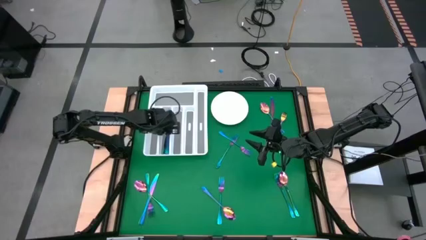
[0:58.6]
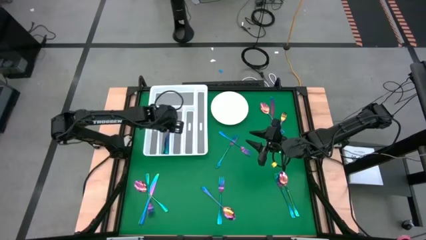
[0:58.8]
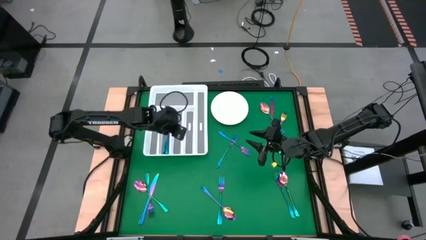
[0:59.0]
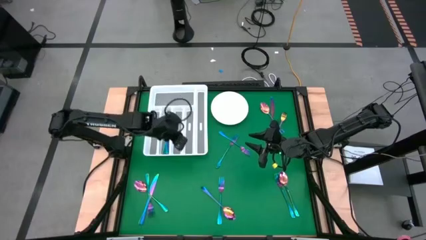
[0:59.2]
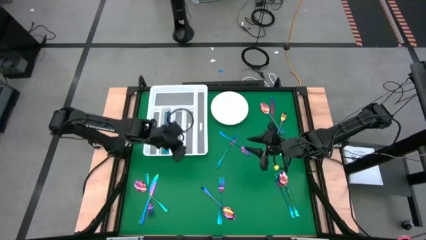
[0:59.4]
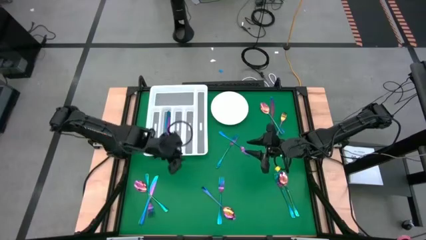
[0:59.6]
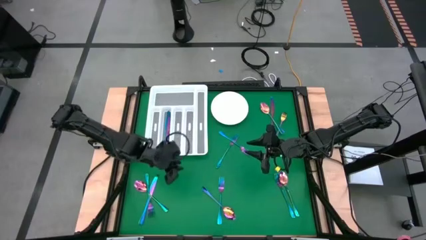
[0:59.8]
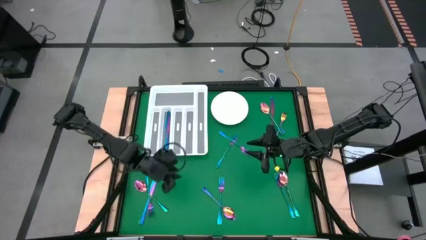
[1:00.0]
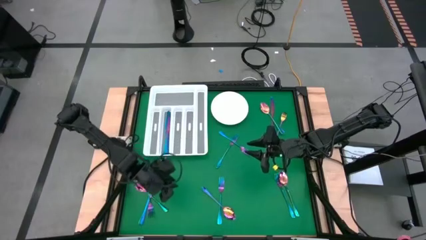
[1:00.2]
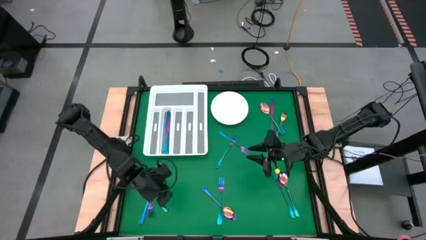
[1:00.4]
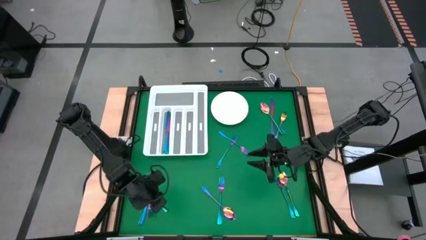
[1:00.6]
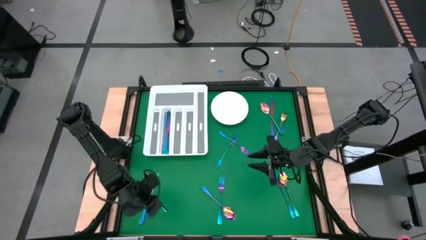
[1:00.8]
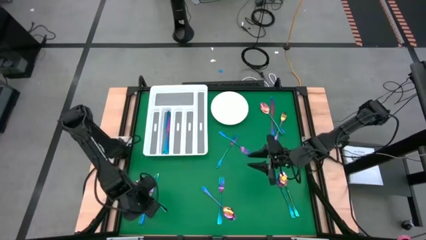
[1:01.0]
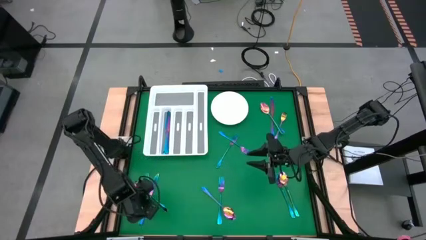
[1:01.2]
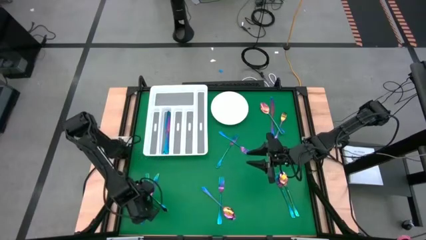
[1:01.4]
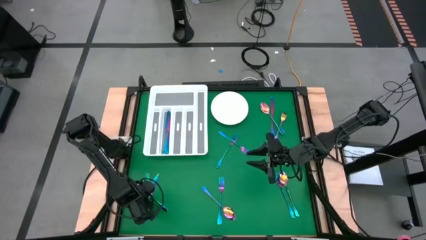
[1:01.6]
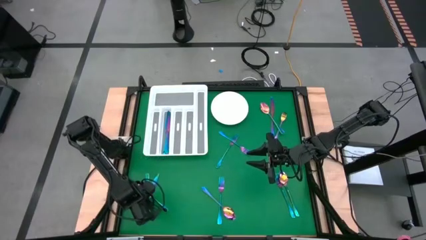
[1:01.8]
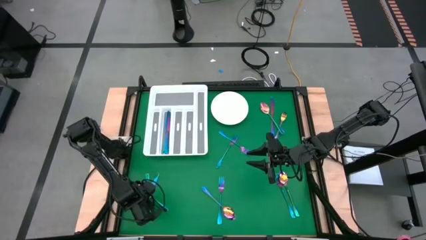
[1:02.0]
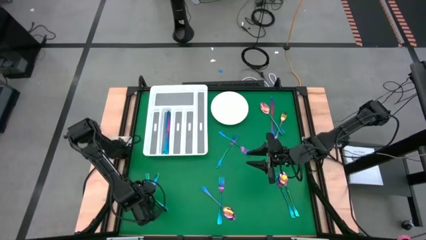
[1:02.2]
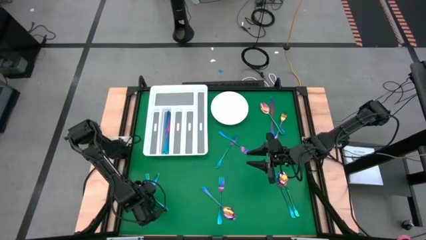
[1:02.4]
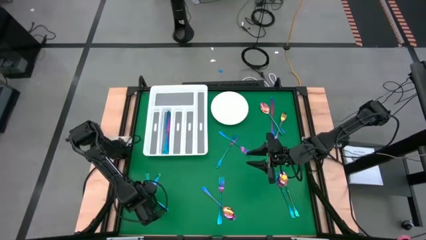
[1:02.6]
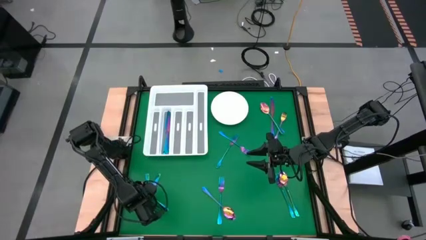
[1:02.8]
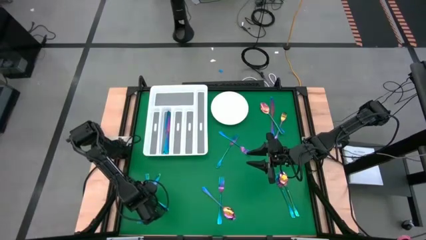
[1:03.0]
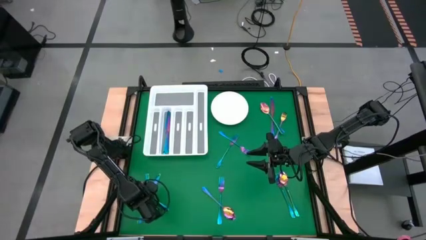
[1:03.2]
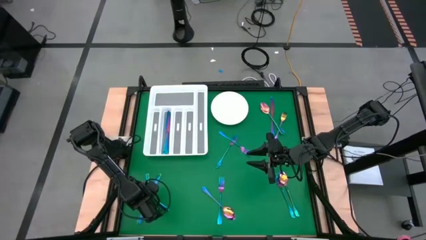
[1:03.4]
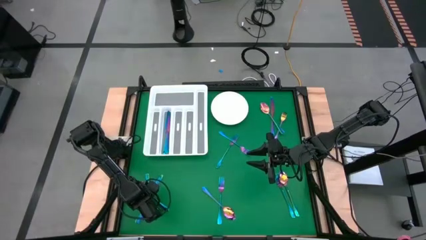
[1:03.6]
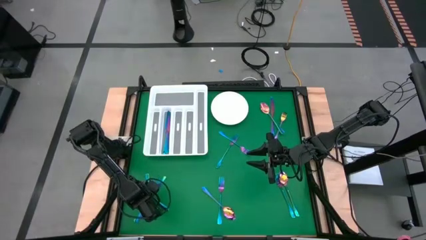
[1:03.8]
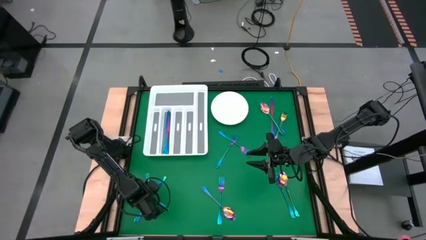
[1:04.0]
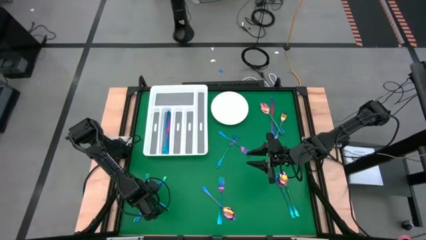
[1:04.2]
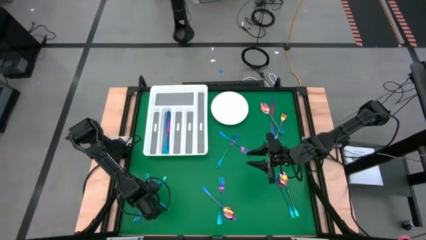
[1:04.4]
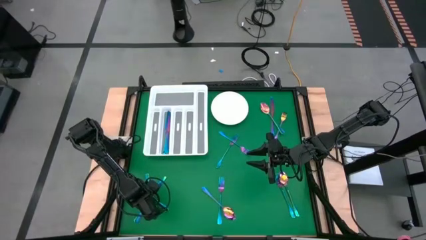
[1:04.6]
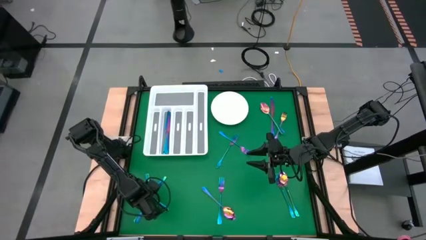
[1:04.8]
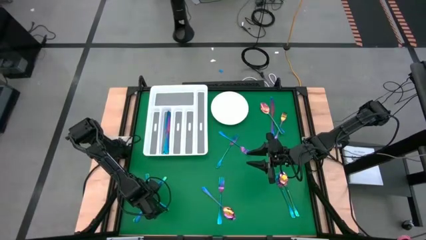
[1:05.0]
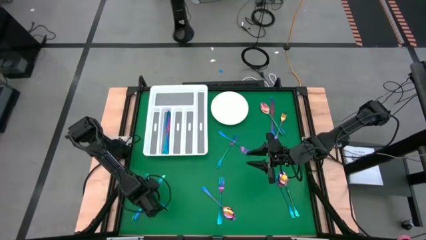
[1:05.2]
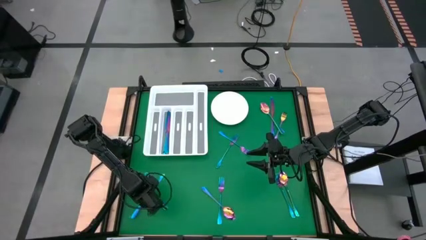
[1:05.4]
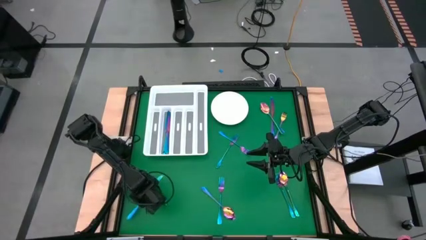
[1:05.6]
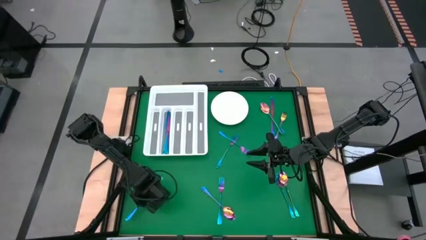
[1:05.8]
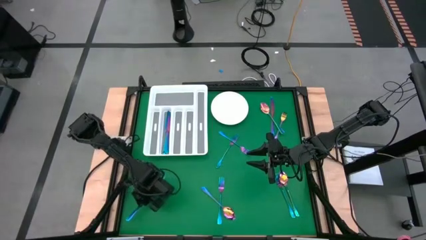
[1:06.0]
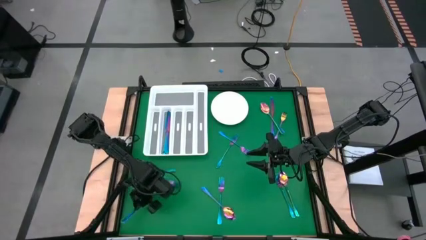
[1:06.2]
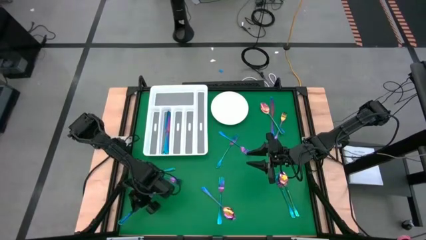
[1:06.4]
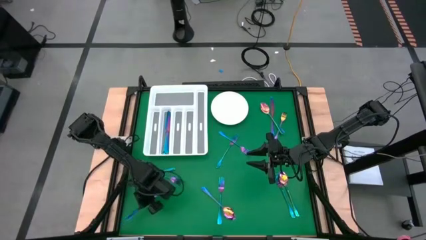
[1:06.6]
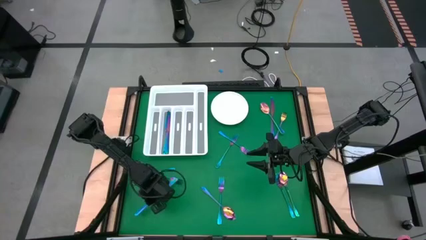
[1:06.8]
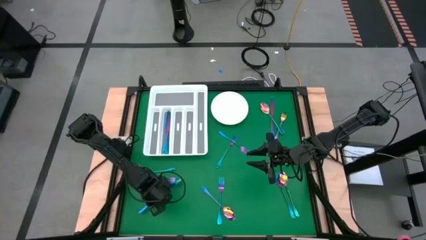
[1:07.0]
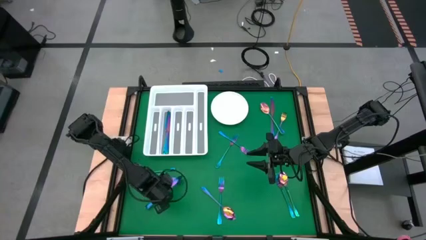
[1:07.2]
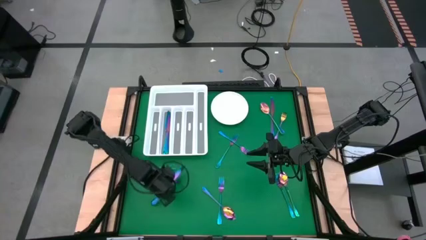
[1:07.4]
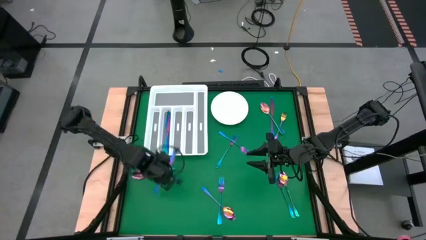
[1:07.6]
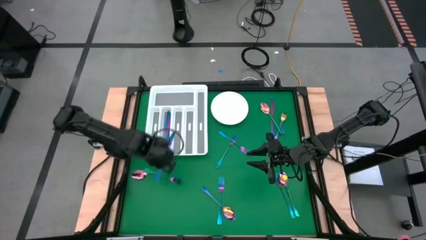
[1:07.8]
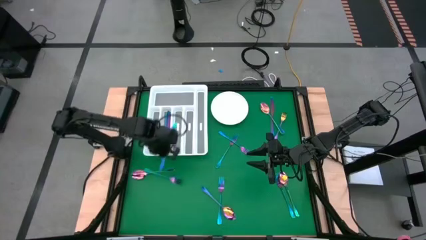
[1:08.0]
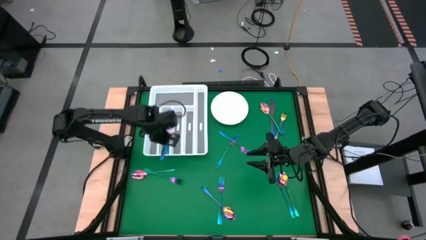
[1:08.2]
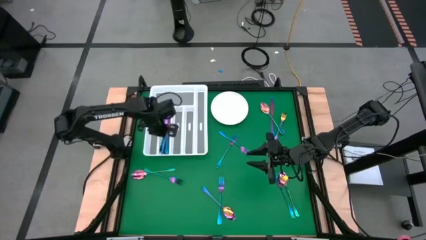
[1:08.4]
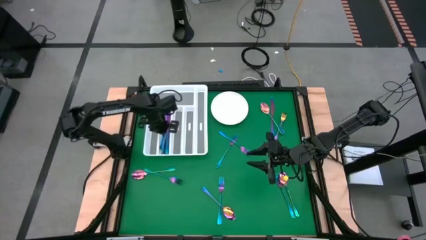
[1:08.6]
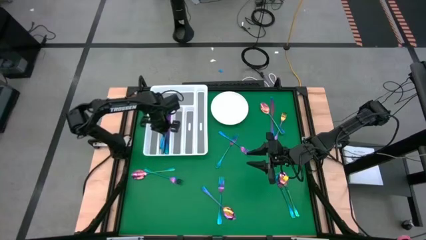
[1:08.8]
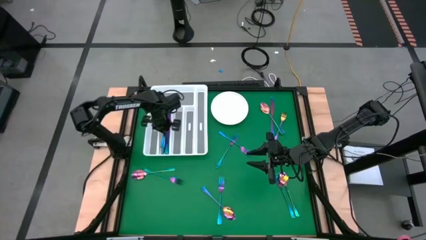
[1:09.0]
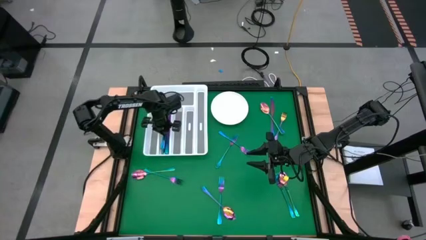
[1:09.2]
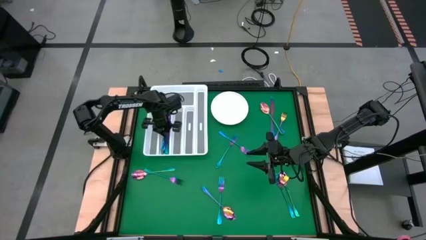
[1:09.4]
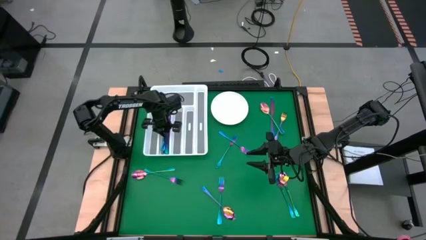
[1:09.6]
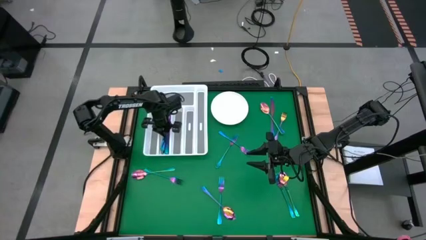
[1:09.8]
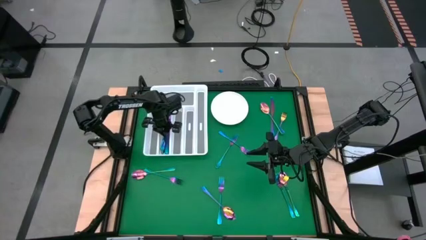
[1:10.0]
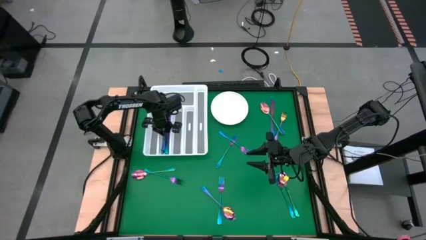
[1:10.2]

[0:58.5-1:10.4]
Task: Sort silverware
Put the blue knife into the silverware tray
